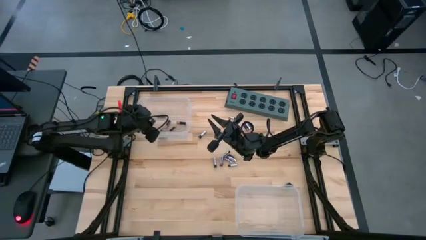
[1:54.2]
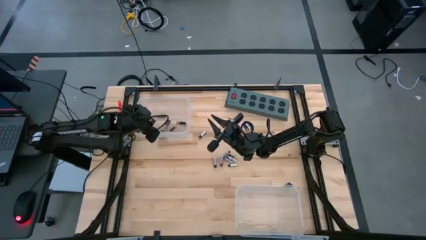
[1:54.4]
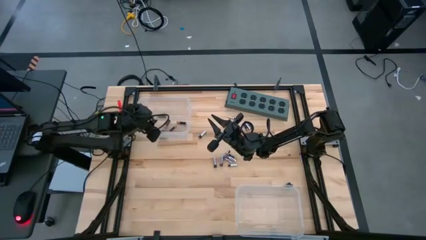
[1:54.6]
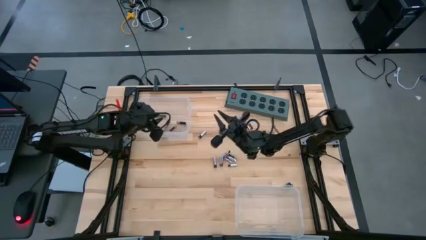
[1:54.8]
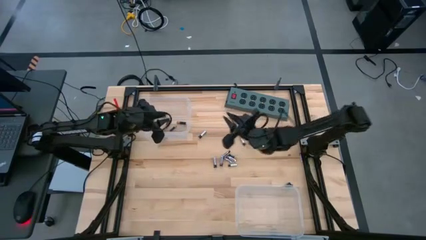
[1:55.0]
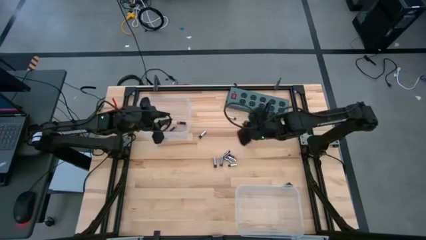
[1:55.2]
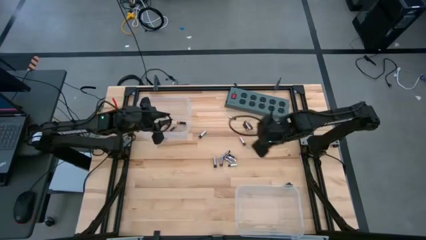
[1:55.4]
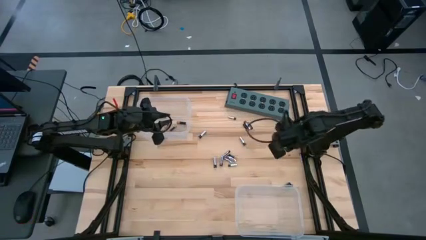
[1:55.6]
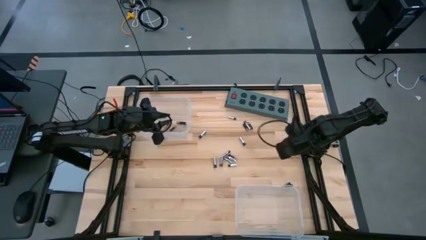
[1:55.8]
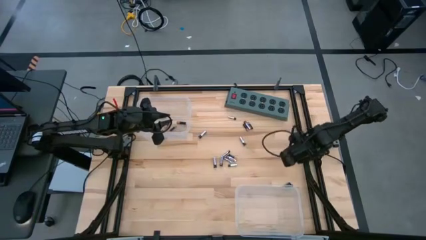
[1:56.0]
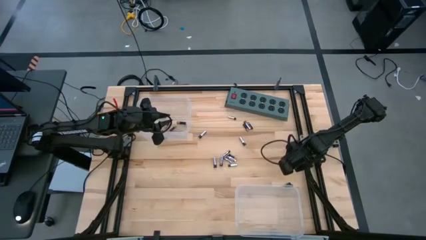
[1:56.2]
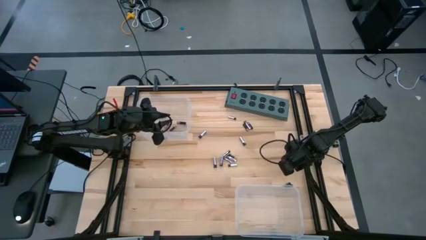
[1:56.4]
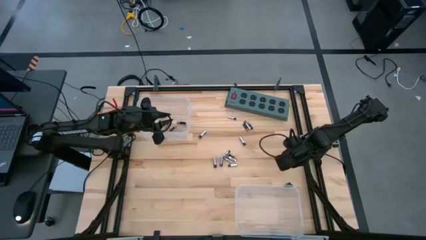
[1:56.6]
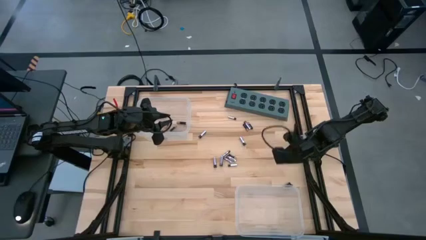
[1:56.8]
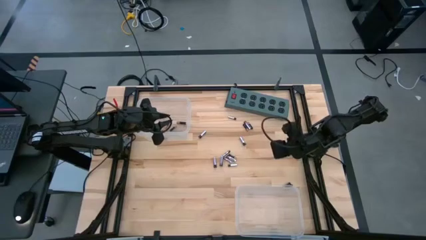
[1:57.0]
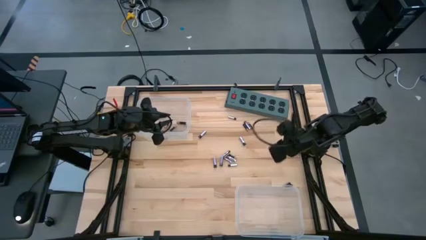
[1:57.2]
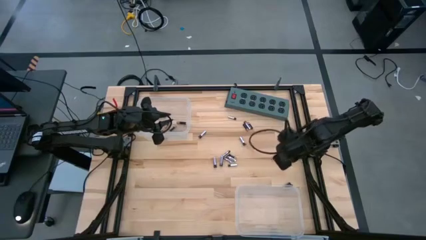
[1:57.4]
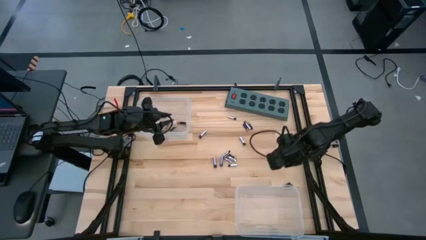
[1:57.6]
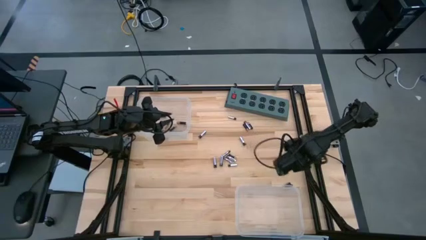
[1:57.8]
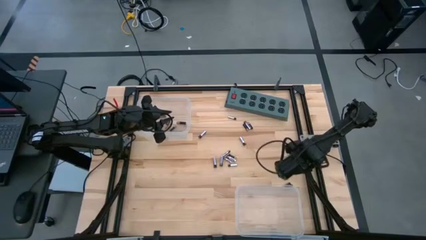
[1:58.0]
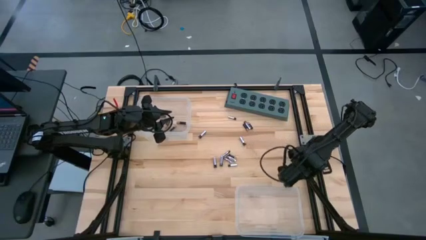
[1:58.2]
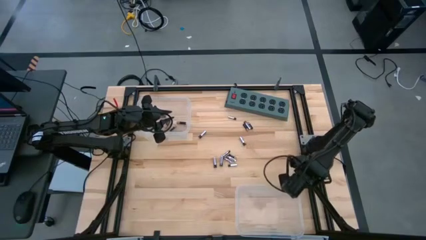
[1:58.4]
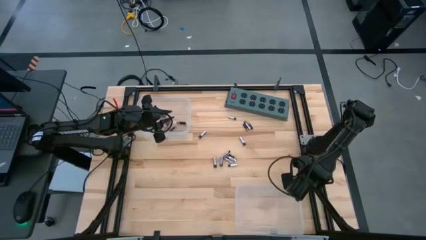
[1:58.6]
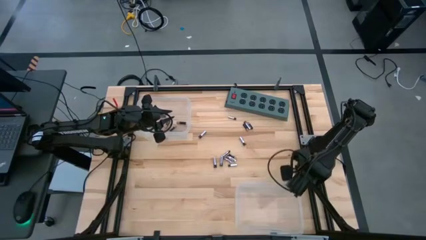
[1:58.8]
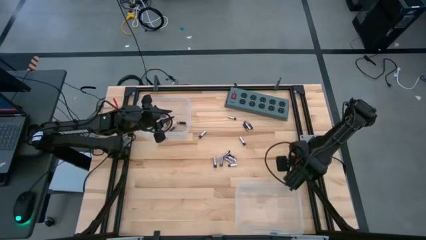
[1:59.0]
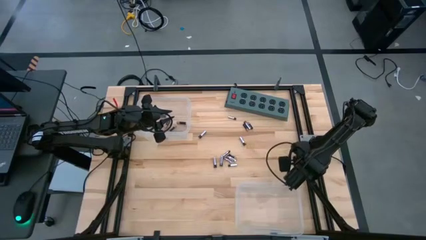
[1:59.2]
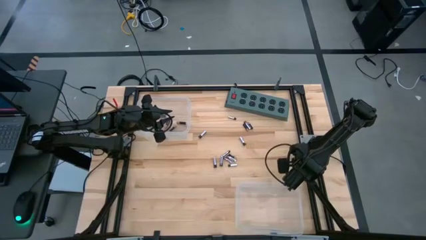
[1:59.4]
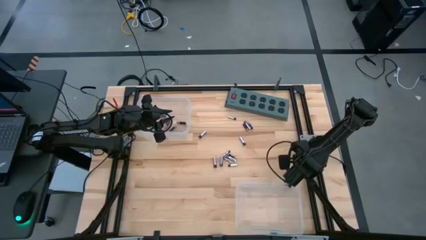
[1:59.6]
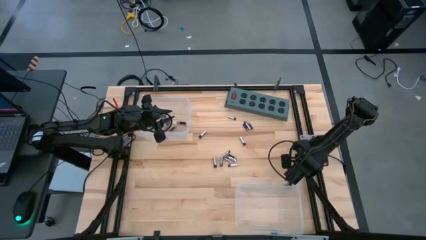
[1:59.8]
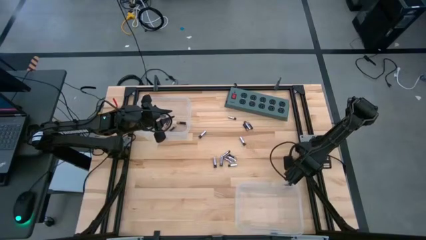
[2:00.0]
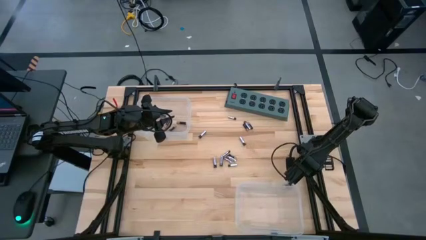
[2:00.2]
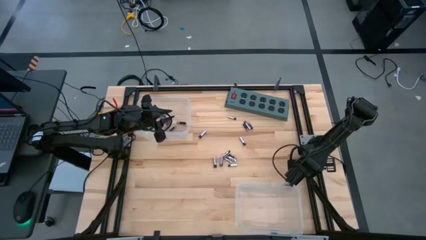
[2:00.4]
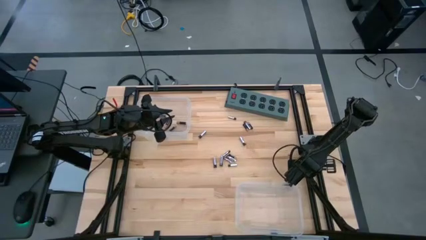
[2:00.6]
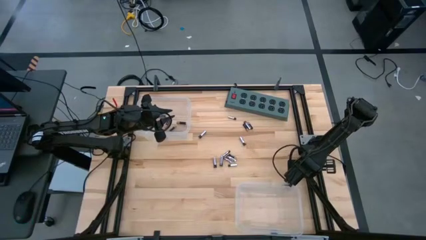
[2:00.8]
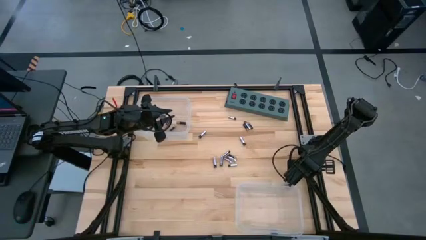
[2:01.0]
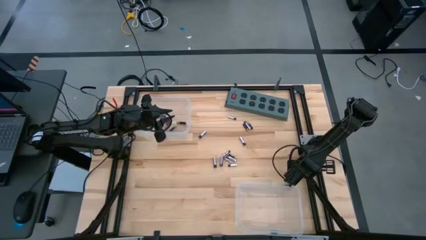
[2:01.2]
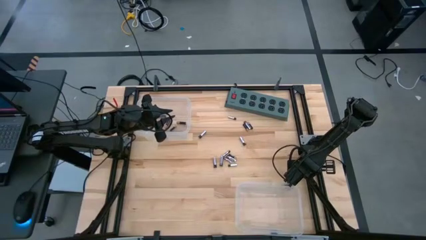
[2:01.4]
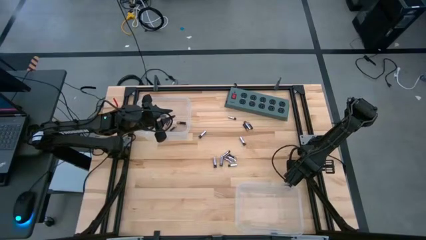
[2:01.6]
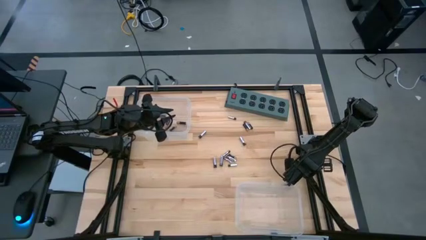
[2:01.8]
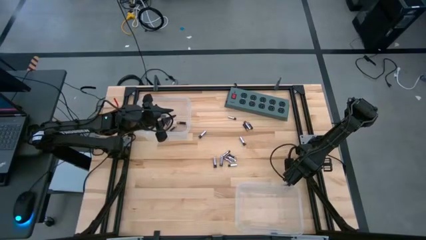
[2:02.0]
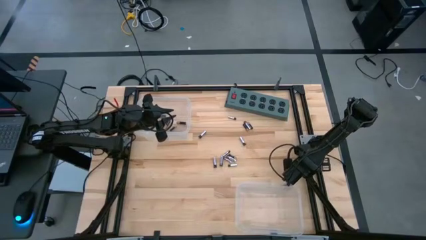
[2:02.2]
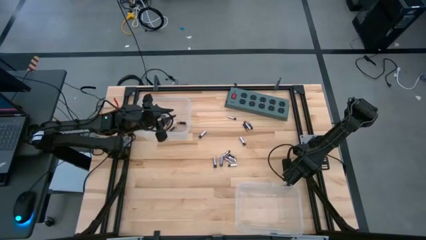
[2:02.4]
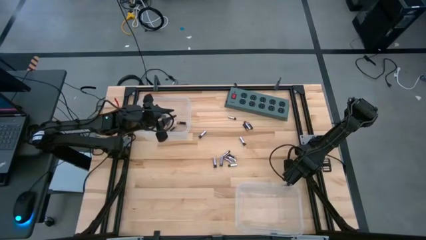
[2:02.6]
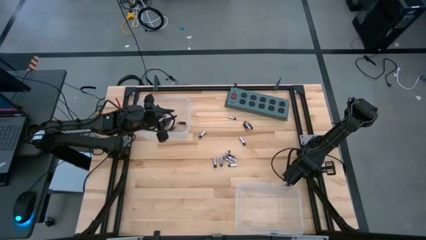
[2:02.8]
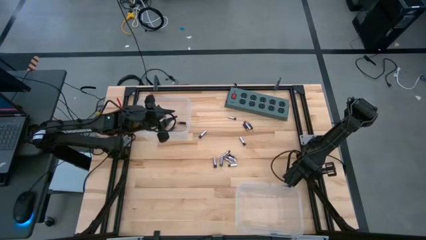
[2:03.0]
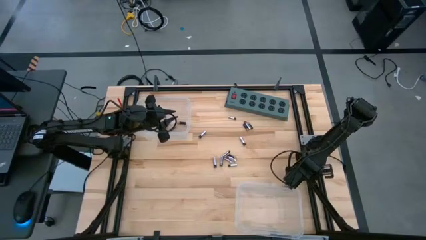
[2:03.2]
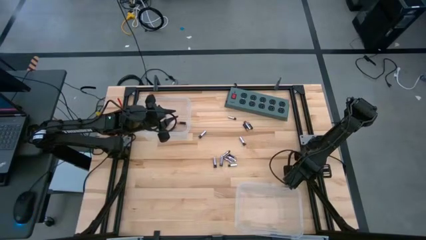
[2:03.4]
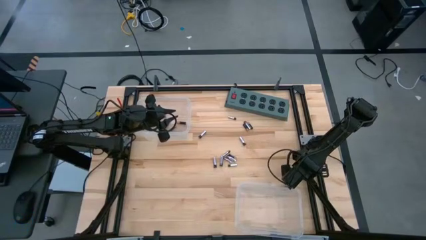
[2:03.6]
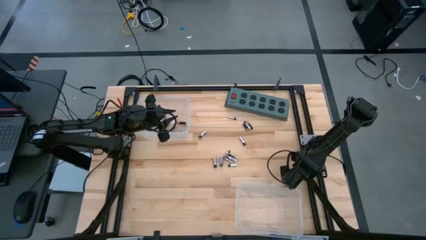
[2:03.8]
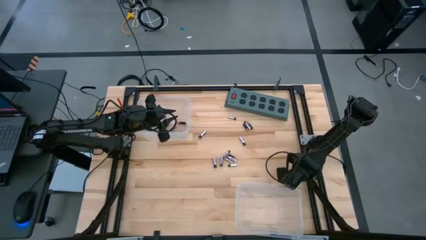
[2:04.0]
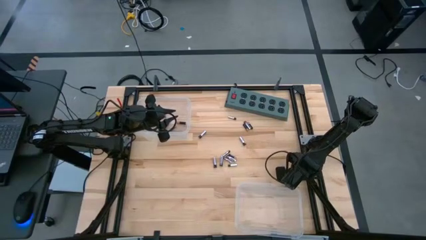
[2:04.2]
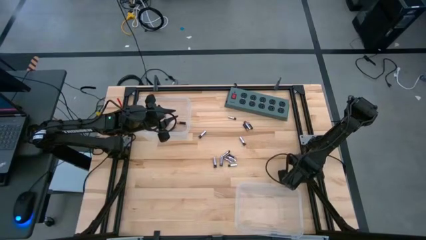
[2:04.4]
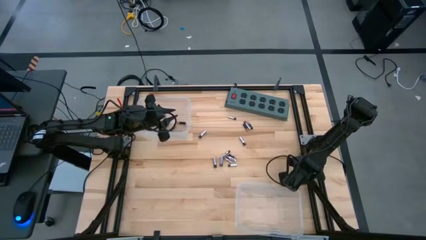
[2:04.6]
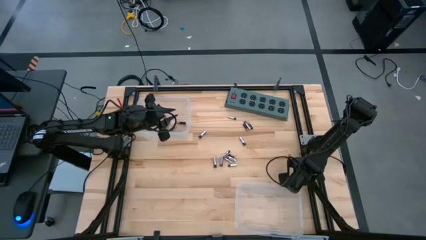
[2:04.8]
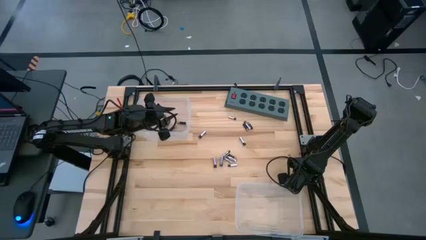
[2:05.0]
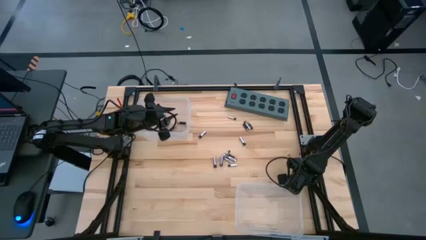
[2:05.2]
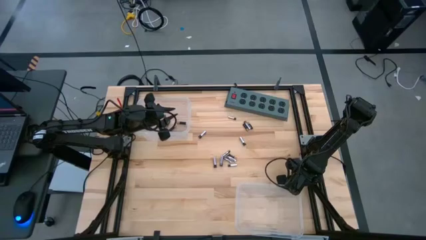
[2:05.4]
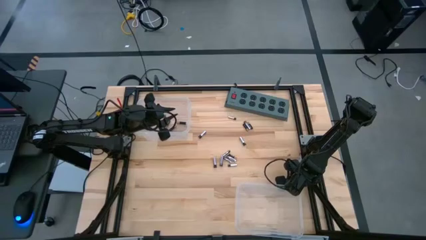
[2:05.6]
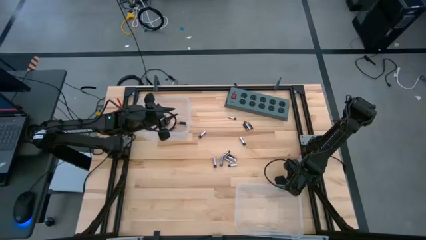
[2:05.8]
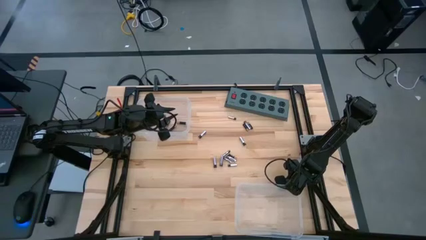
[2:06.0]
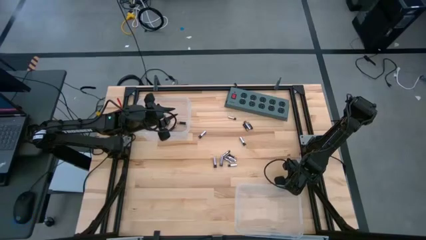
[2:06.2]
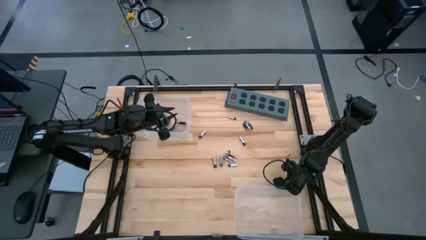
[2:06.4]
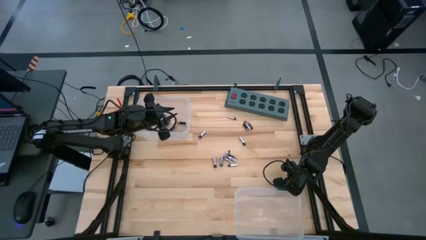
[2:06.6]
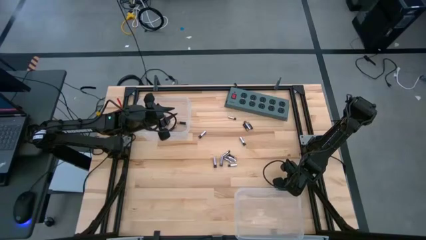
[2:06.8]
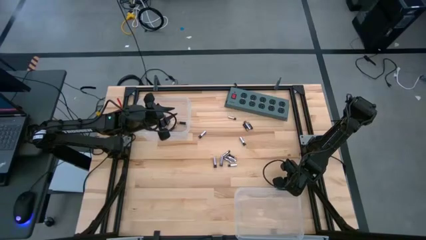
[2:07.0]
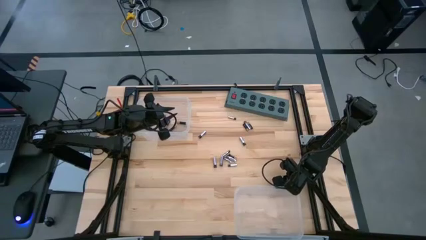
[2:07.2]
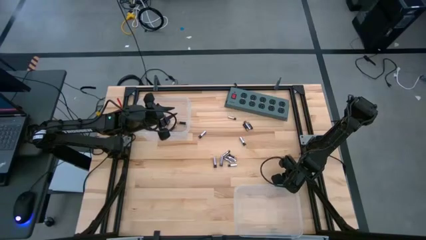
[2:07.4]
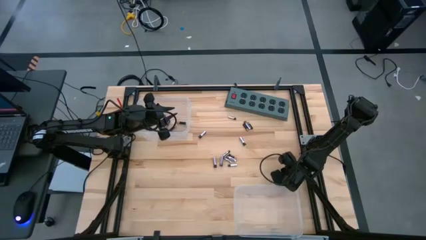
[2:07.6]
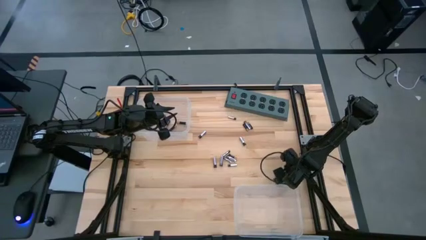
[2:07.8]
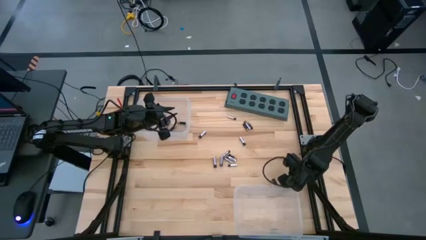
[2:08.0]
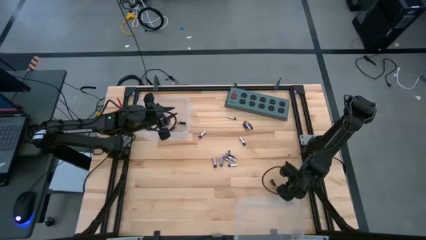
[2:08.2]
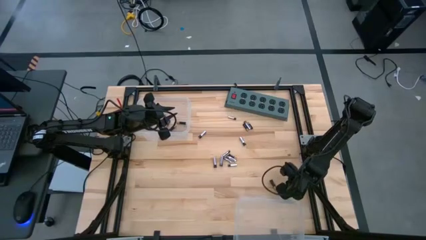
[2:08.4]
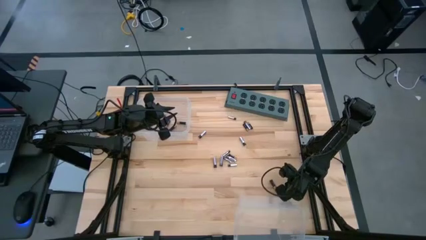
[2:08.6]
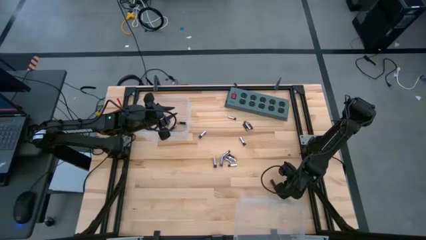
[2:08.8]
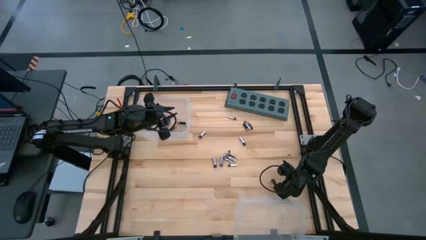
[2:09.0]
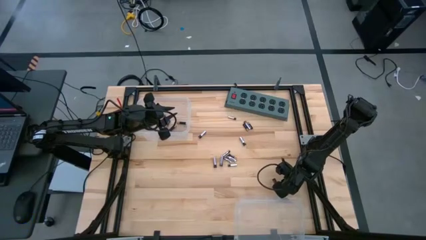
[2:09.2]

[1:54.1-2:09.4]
Task: Sort batteries
Put the black battery into the top transparent bin
